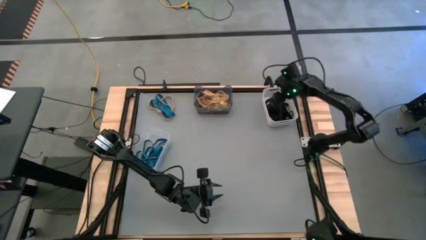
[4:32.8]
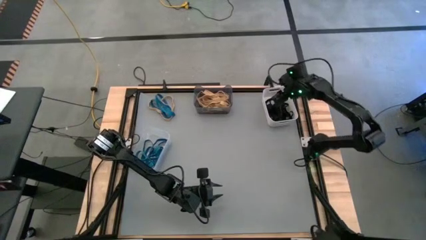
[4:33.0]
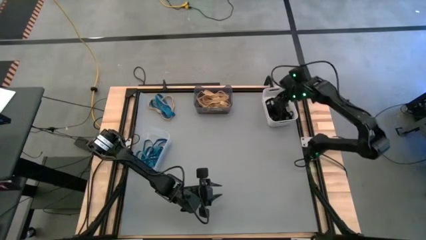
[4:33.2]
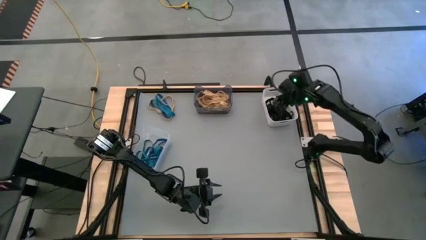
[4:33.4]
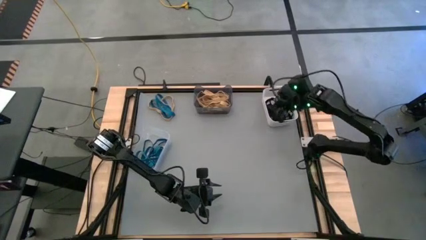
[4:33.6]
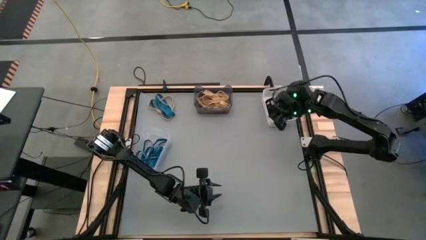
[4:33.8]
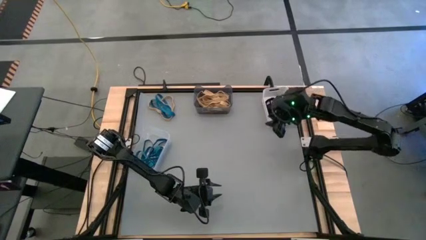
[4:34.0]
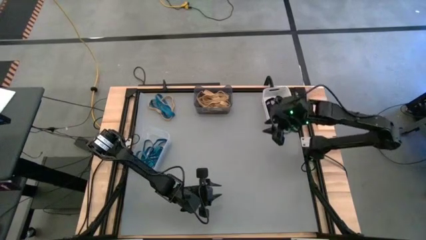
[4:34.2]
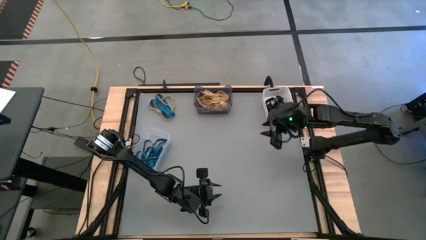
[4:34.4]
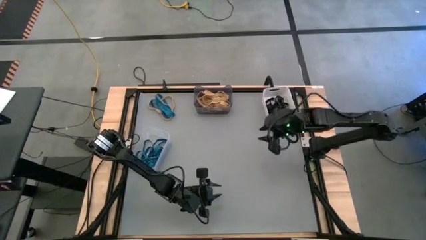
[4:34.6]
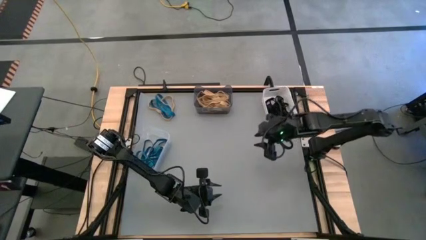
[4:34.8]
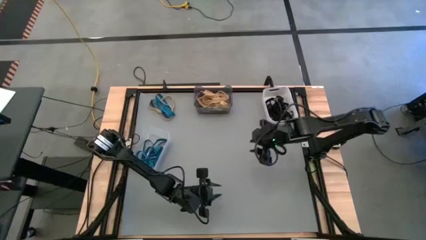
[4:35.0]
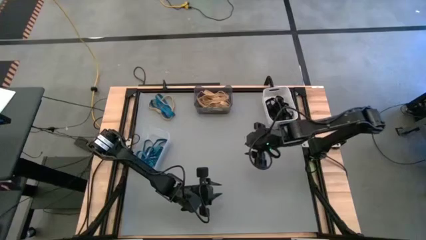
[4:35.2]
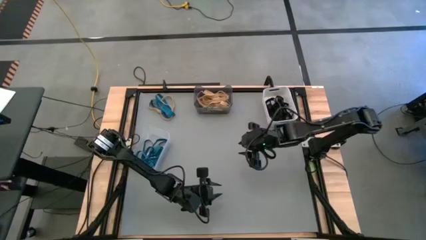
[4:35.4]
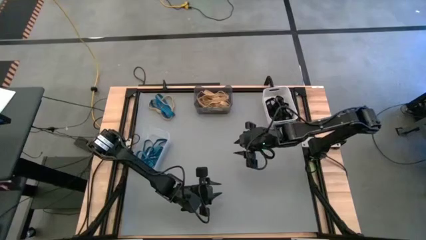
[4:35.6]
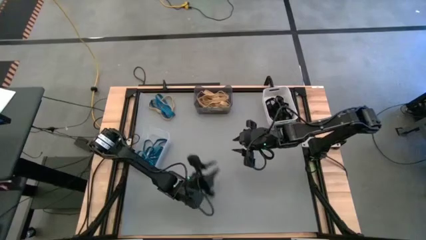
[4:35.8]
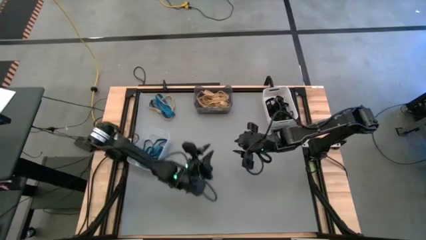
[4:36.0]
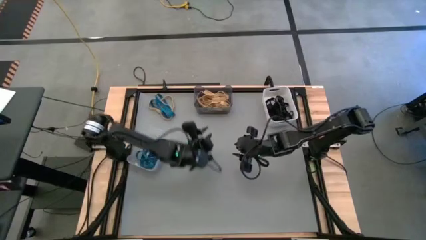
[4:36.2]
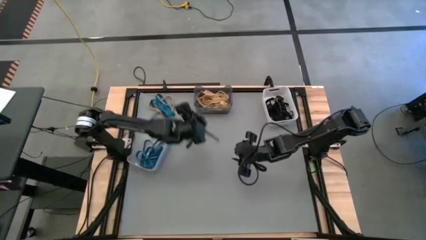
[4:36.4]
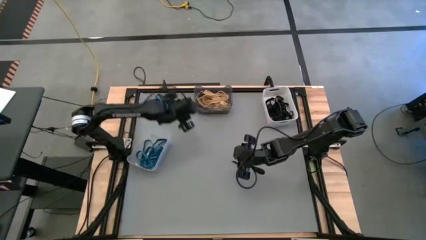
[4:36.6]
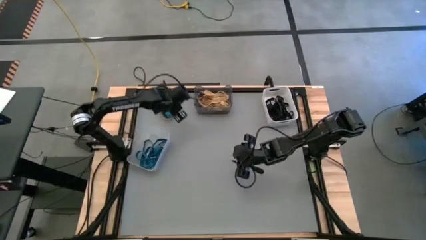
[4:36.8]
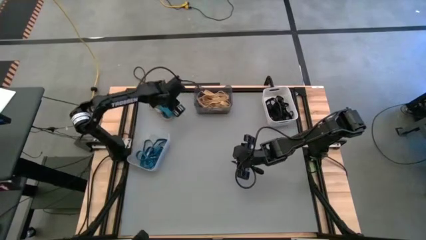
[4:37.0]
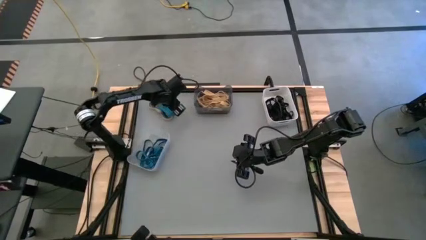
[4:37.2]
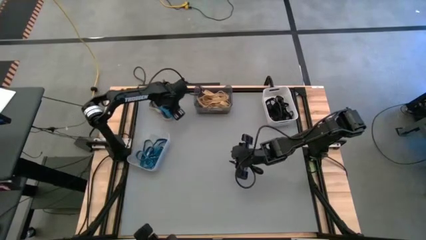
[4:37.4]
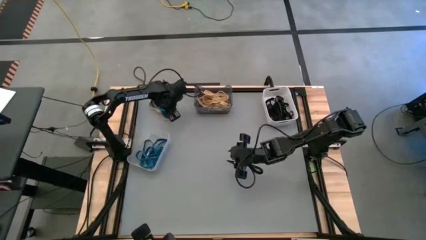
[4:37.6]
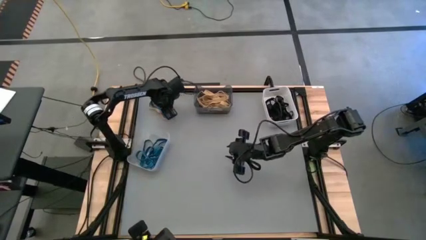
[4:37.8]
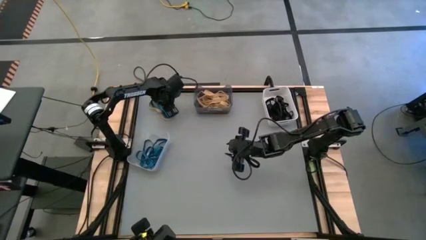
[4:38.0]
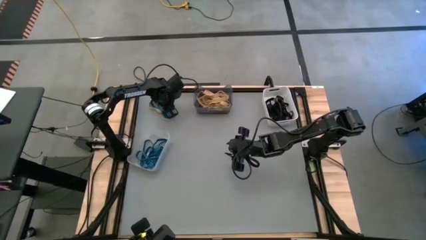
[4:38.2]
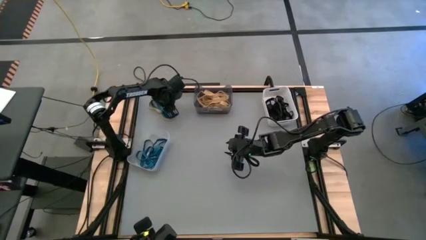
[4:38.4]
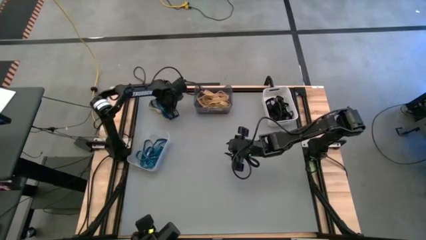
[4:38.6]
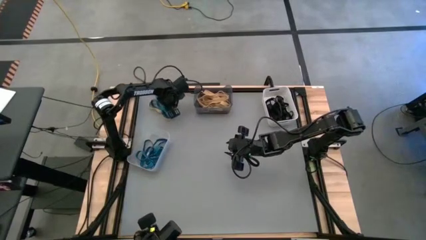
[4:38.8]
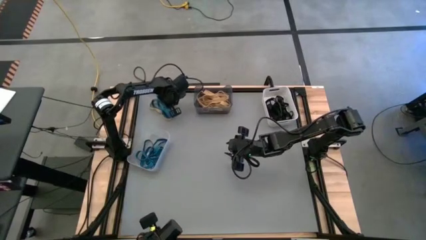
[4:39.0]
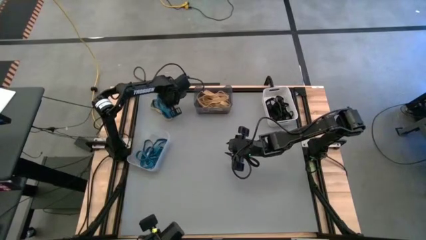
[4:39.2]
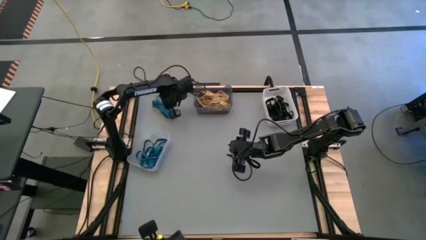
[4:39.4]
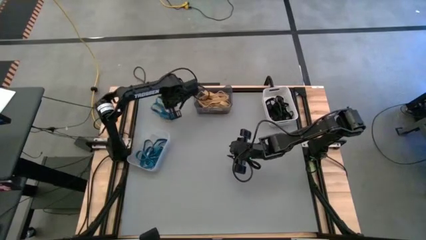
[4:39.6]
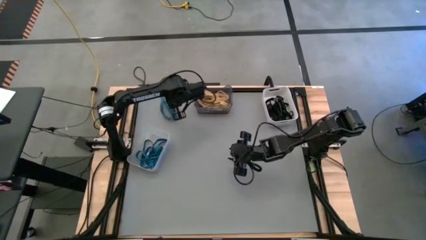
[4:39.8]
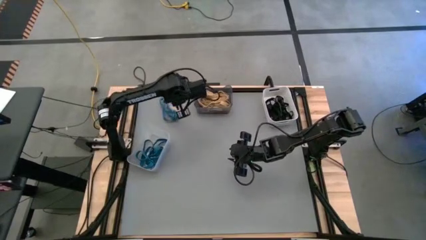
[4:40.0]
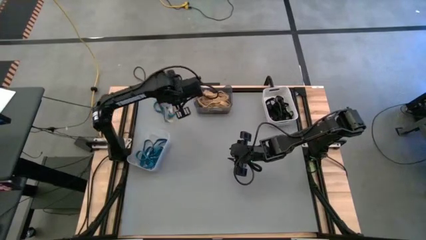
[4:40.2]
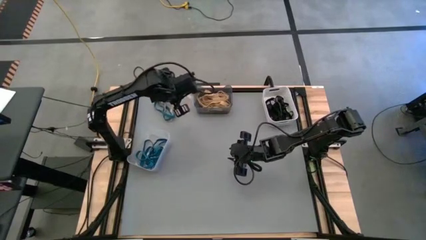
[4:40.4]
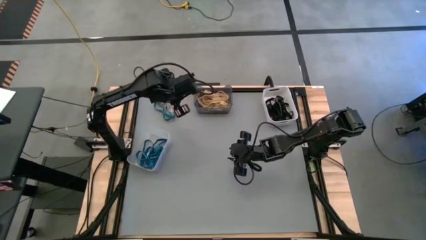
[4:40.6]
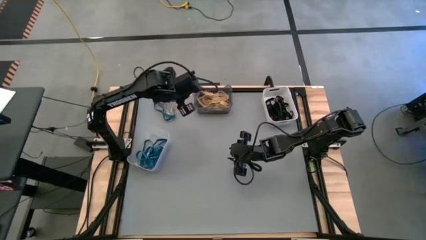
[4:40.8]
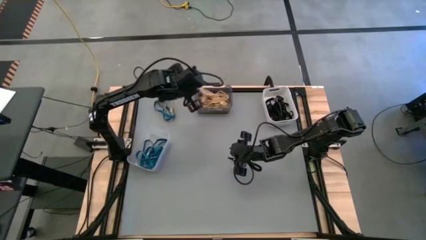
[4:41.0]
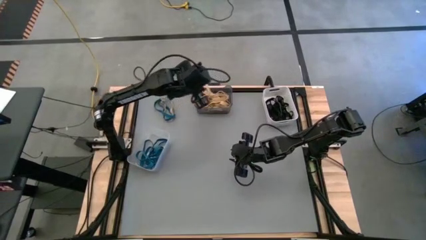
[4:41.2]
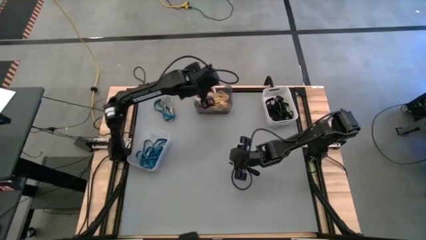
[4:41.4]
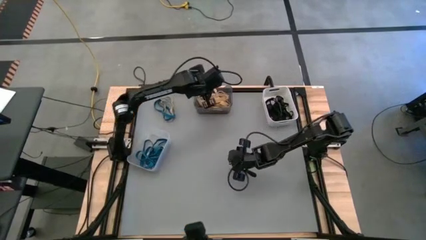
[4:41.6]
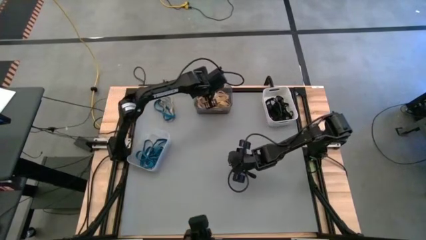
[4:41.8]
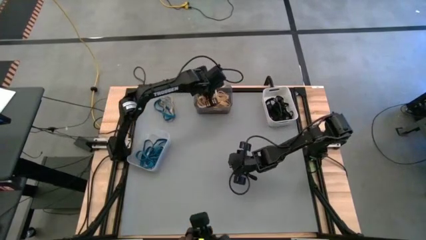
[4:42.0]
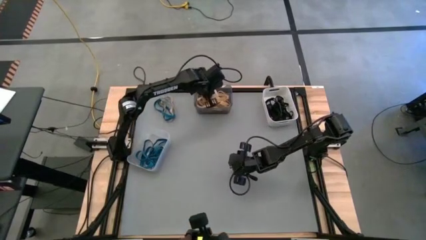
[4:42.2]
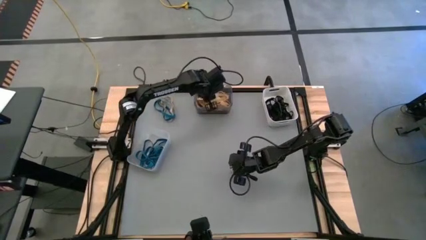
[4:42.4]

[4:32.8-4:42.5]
Task: Sort rubber bands into baskets
Put the brown rubber band into the black bin

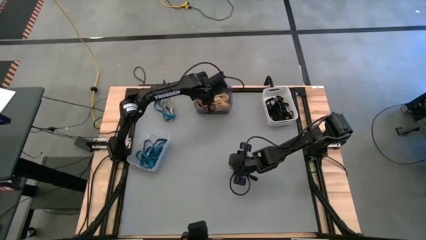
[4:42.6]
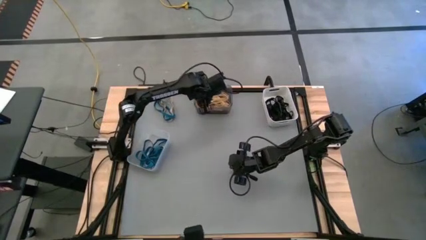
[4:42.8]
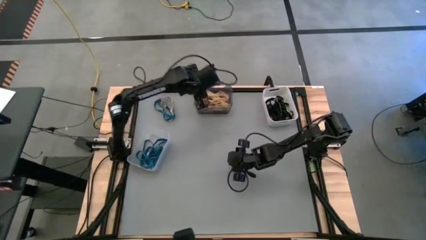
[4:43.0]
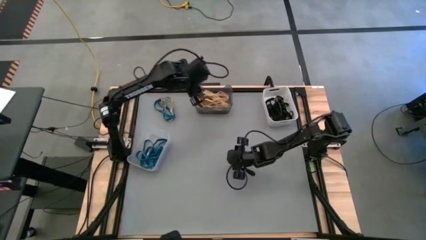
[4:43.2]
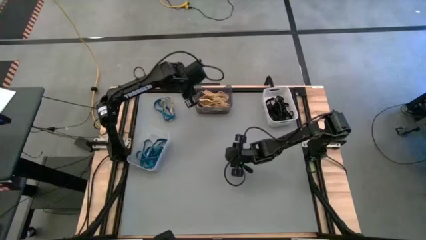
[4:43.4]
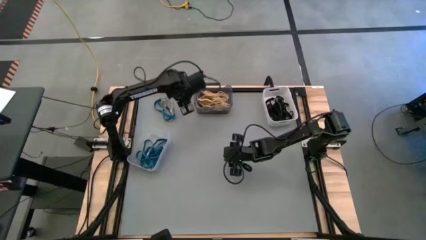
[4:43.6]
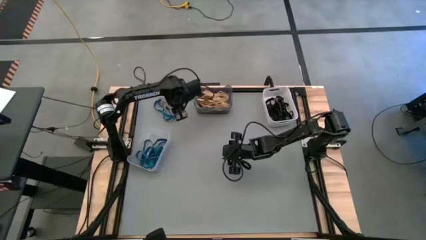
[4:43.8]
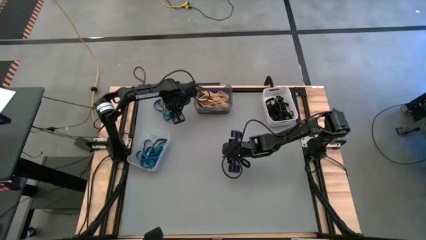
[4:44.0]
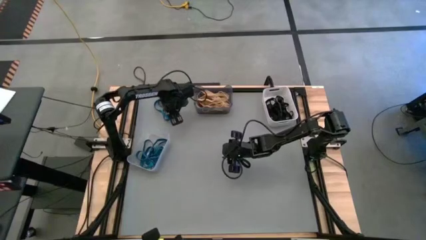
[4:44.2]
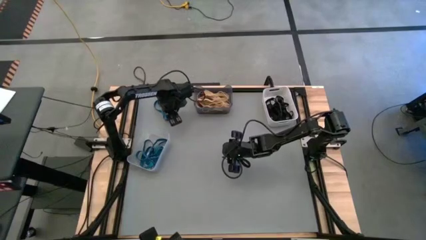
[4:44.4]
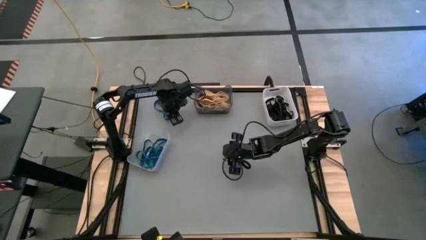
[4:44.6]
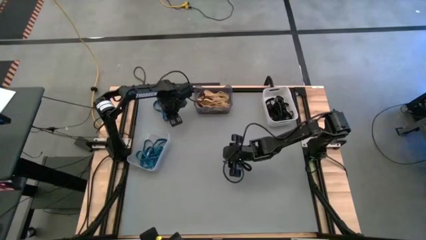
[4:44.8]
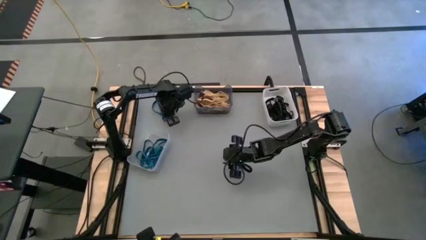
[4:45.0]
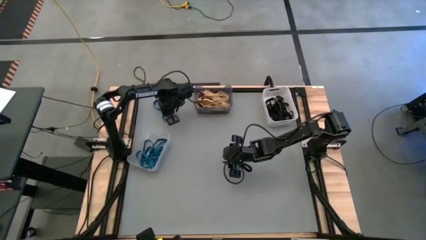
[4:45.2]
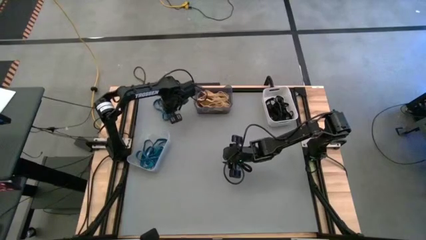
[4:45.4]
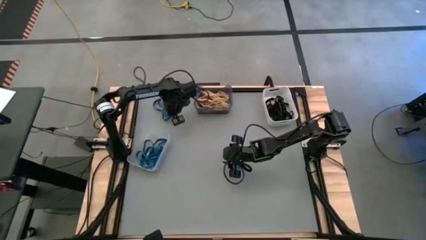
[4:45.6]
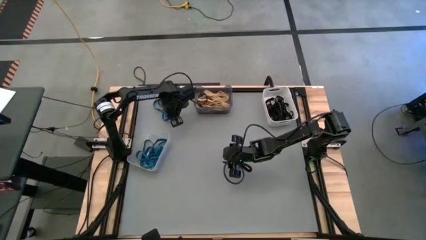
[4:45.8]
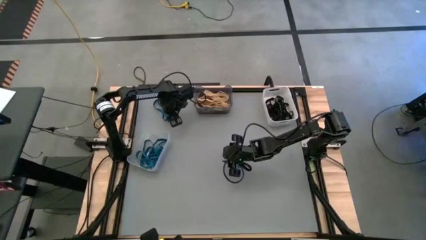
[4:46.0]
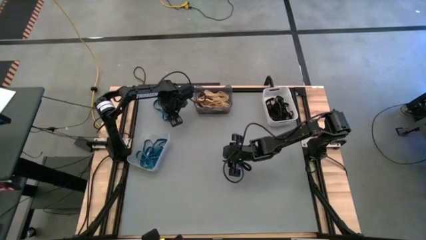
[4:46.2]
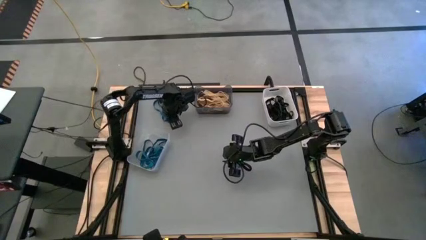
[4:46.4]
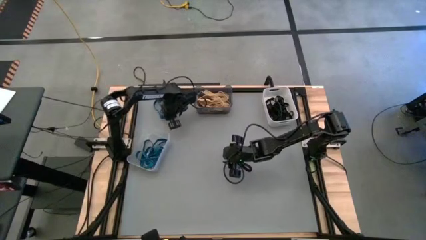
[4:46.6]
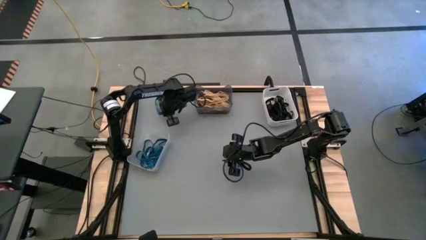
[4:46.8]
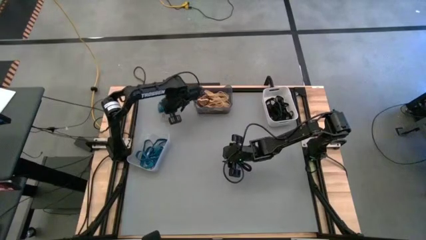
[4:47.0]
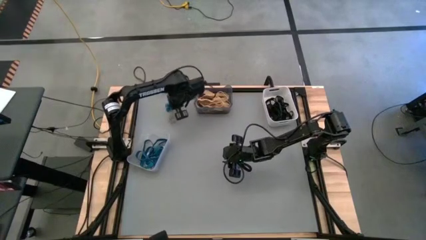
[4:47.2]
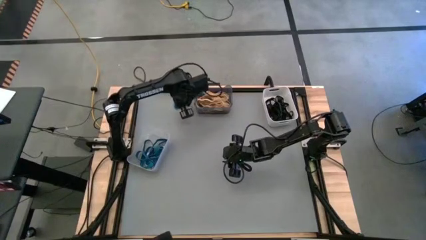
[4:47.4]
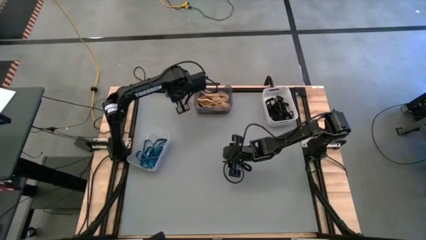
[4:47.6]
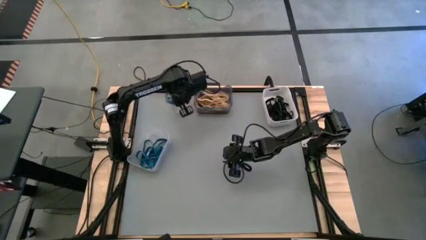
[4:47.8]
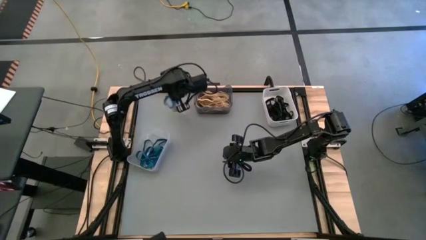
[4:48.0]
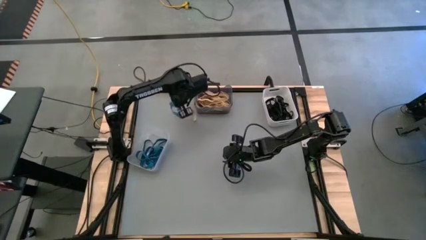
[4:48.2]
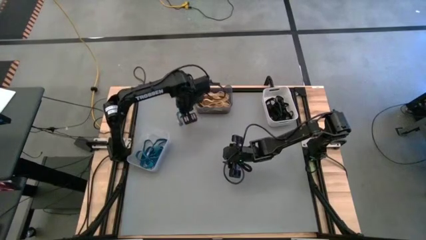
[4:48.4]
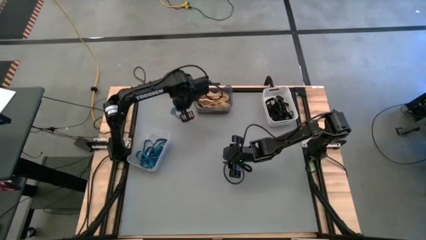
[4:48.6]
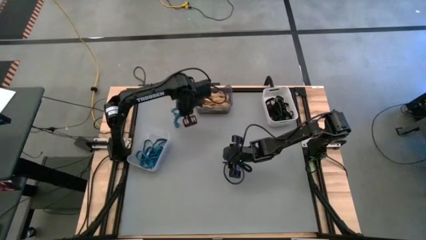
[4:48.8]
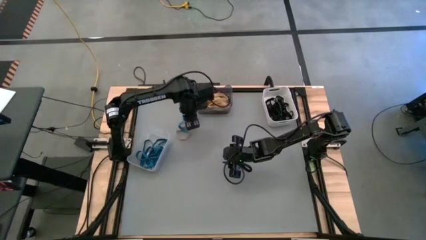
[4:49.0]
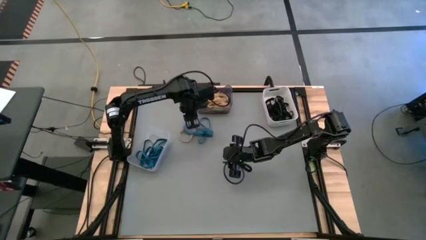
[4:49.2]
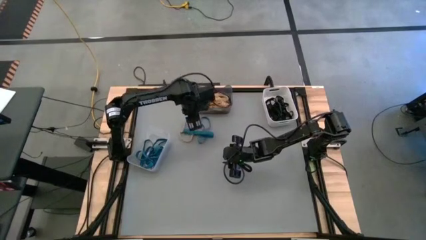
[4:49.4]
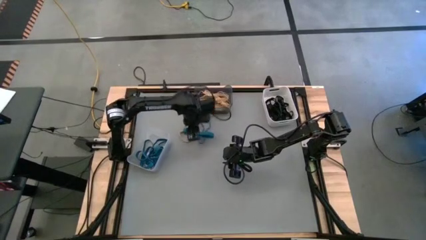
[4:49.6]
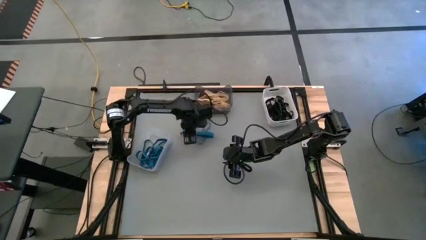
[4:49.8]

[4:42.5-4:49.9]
Put the blue rubber band into the transparent bin
